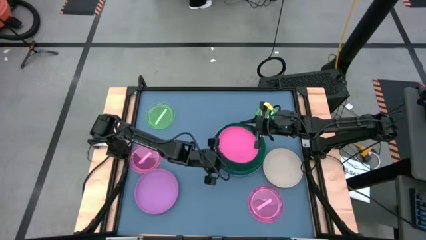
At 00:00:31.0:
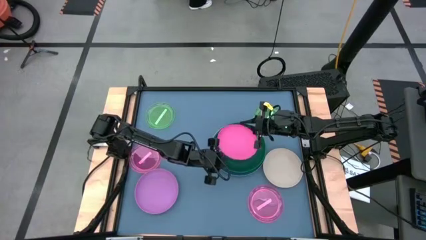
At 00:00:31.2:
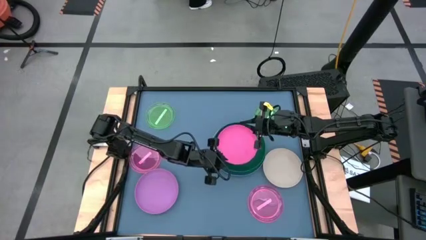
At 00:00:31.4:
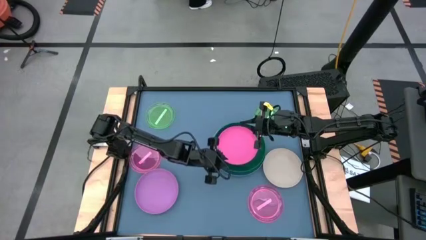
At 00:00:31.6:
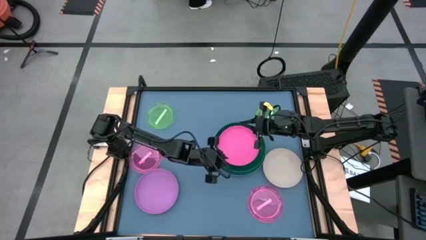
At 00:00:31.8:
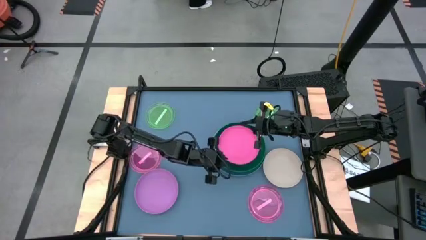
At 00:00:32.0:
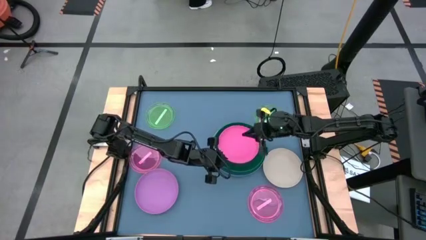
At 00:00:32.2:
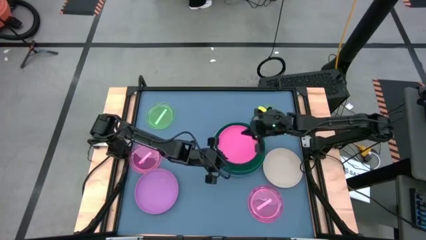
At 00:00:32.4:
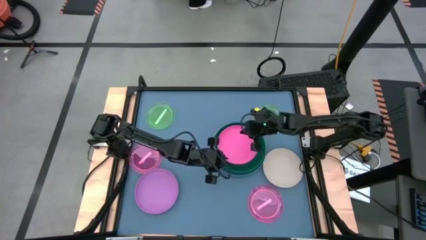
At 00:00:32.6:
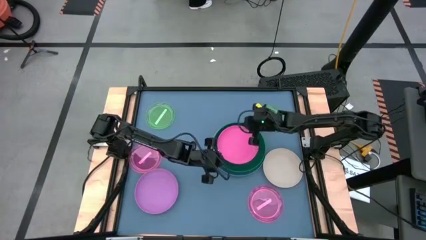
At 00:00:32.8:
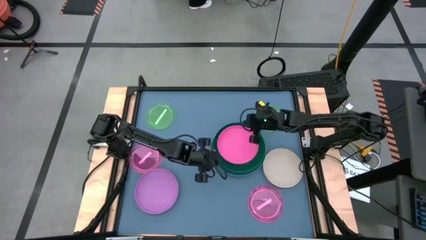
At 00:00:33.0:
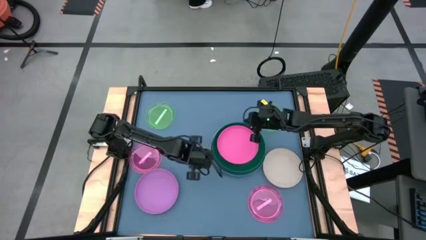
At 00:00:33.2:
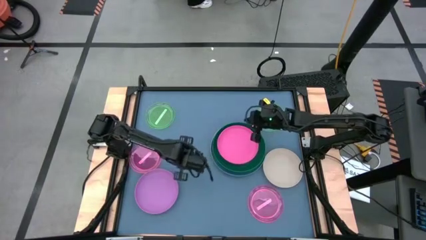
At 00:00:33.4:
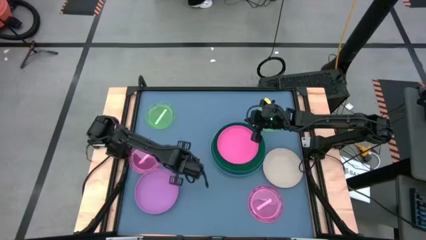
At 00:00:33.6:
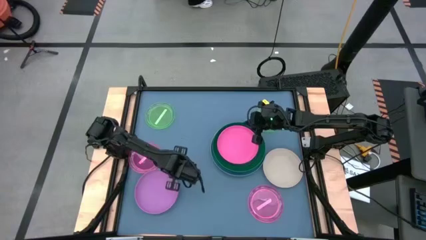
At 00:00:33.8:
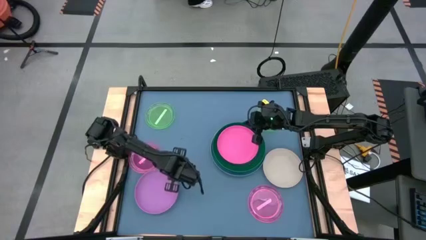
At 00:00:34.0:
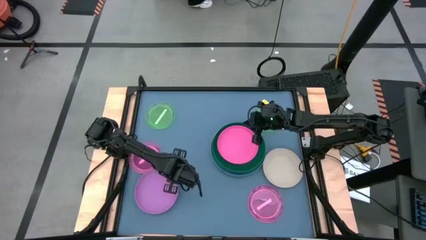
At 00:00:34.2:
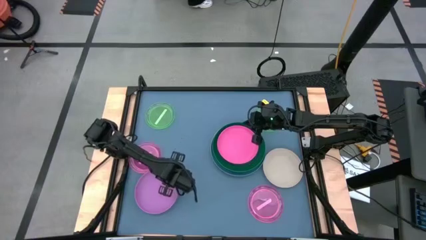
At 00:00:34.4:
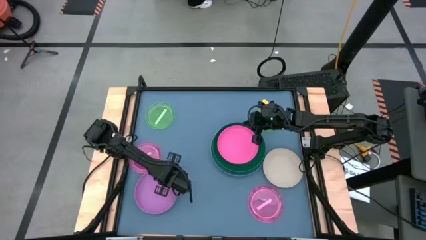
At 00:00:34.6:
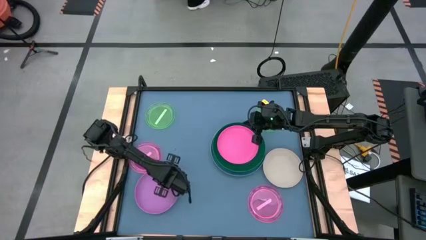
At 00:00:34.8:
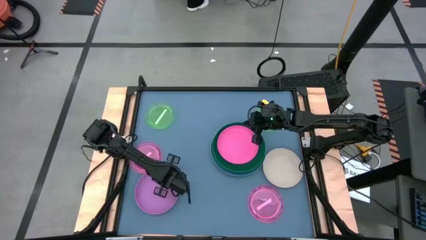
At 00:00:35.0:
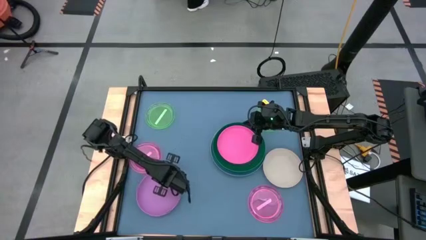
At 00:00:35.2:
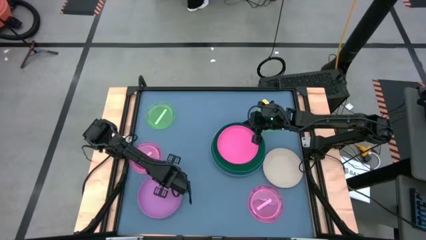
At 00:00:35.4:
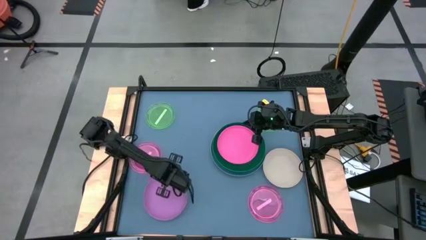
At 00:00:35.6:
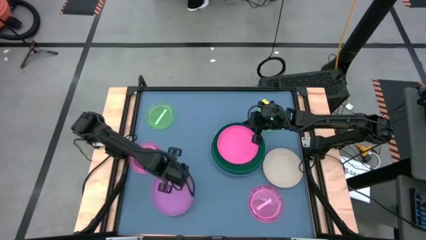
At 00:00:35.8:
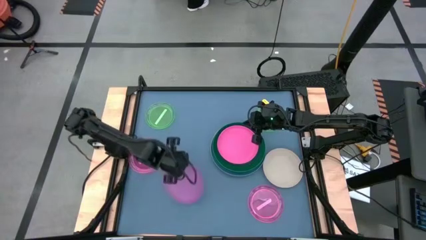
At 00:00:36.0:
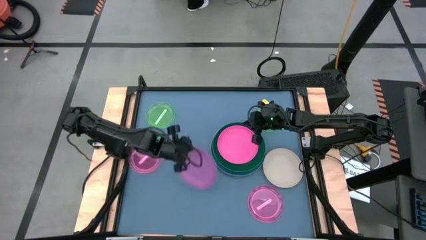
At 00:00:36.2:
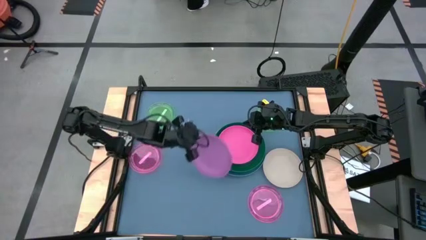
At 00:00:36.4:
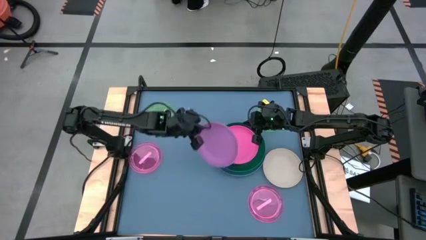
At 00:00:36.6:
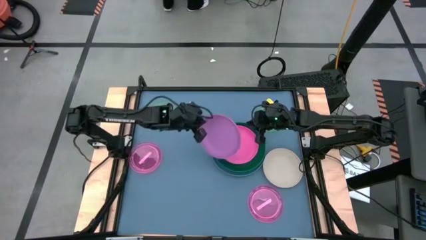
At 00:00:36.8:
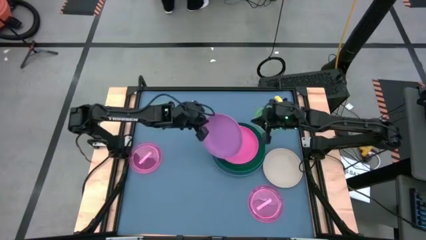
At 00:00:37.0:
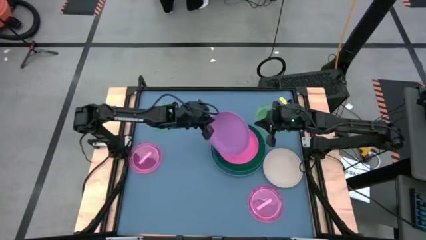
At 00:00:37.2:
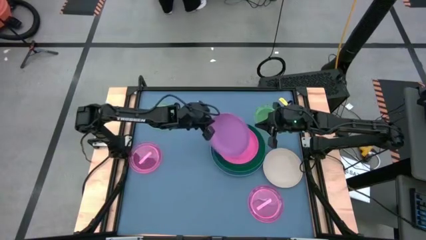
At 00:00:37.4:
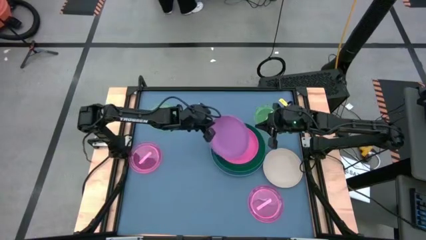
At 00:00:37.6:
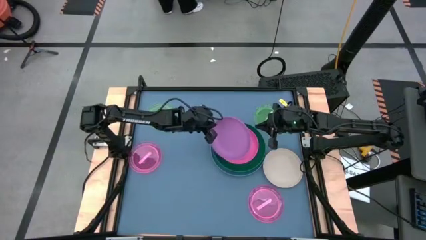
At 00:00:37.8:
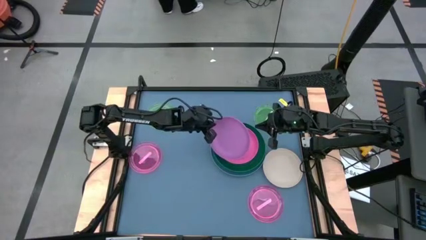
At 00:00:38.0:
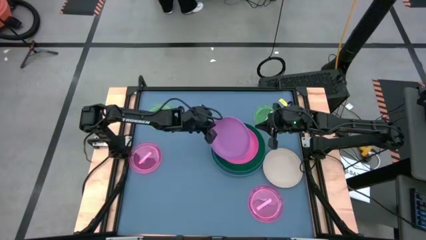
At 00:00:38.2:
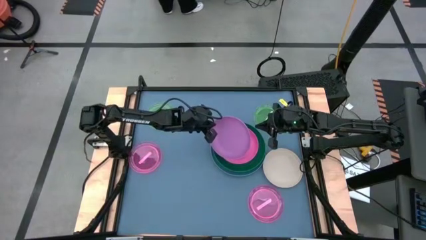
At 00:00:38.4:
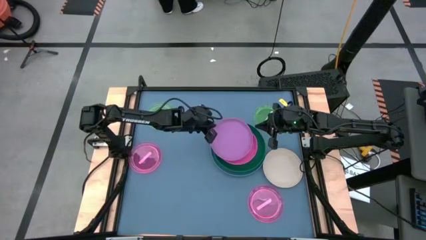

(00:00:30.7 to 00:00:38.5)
Task: Stack plastic plates
Stack the violet plate on top of the pink plate

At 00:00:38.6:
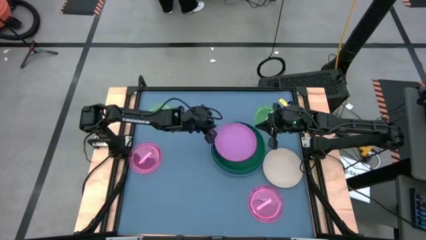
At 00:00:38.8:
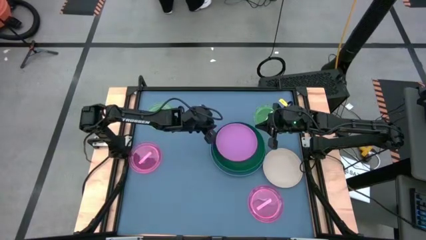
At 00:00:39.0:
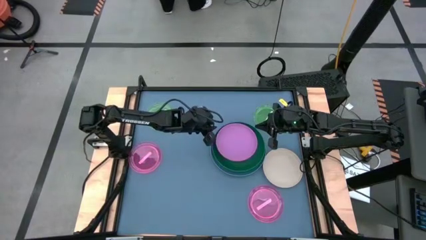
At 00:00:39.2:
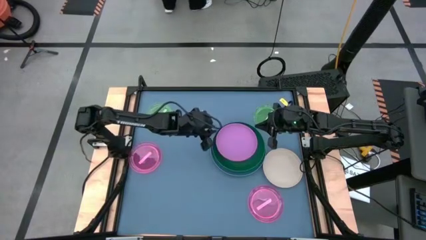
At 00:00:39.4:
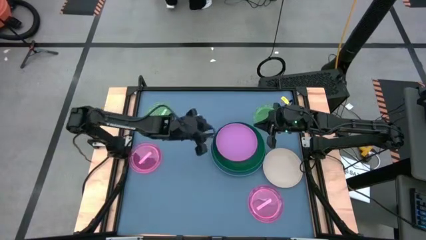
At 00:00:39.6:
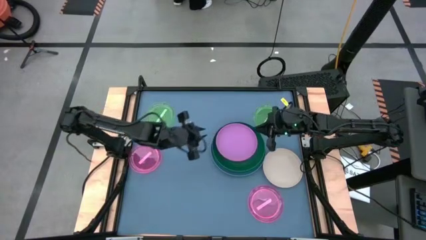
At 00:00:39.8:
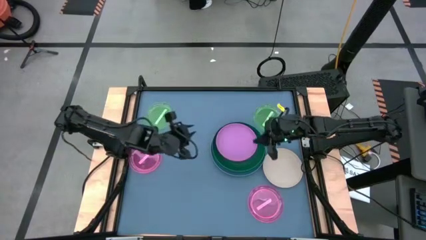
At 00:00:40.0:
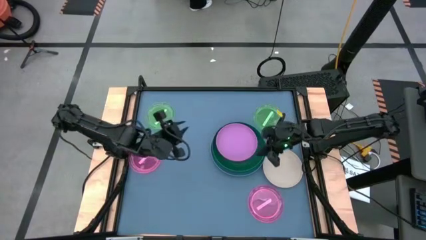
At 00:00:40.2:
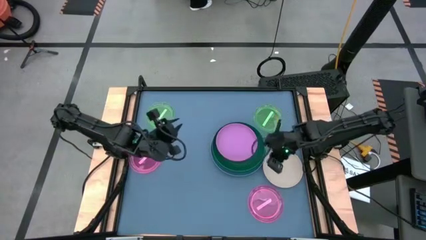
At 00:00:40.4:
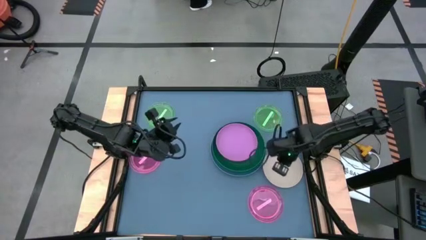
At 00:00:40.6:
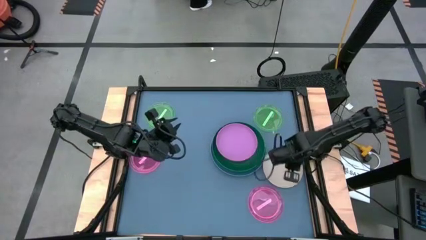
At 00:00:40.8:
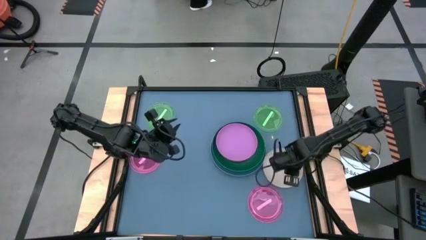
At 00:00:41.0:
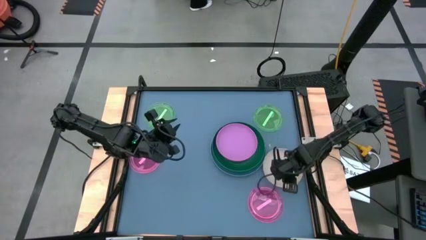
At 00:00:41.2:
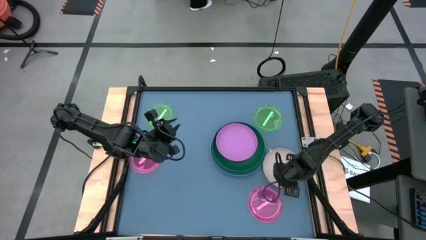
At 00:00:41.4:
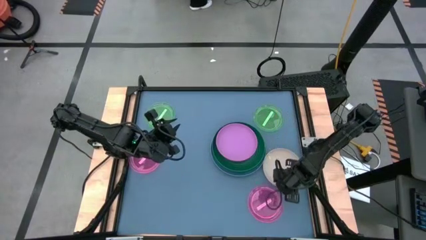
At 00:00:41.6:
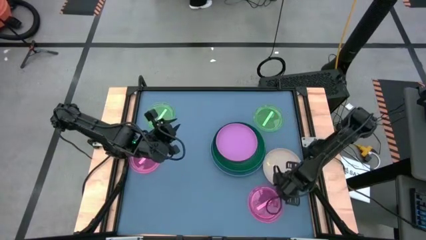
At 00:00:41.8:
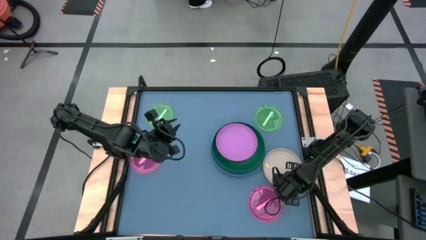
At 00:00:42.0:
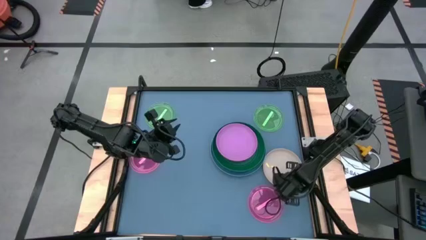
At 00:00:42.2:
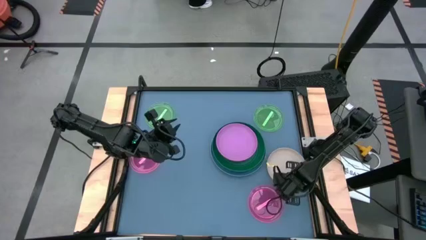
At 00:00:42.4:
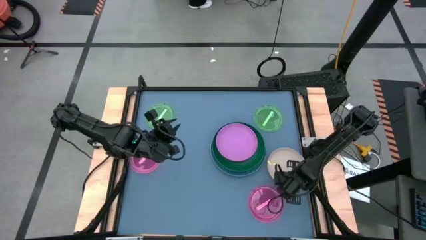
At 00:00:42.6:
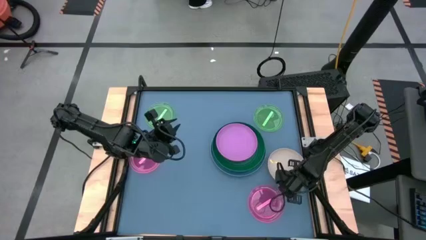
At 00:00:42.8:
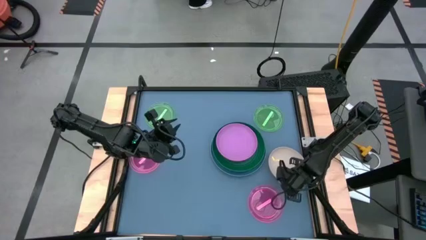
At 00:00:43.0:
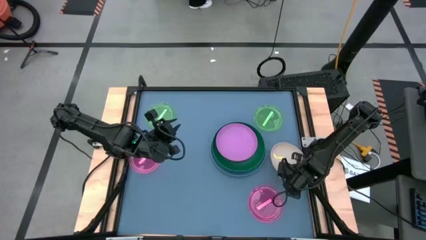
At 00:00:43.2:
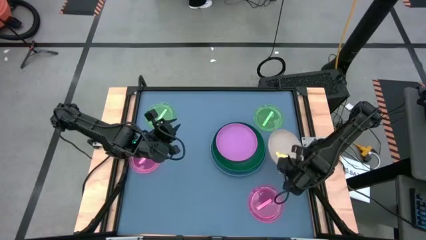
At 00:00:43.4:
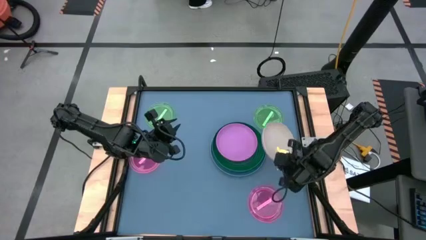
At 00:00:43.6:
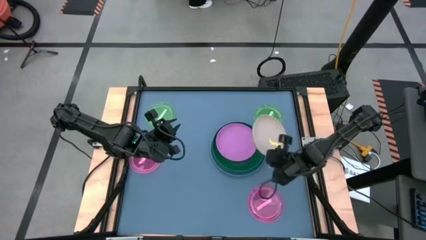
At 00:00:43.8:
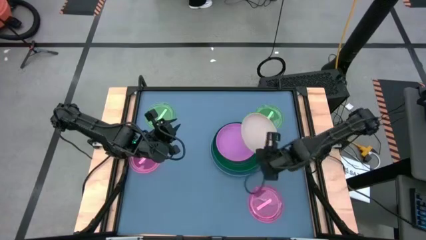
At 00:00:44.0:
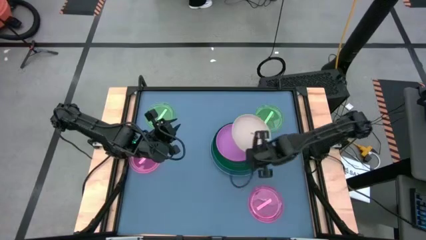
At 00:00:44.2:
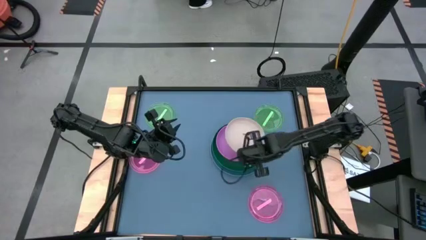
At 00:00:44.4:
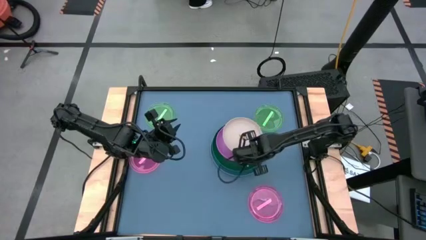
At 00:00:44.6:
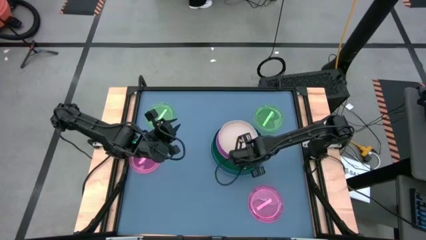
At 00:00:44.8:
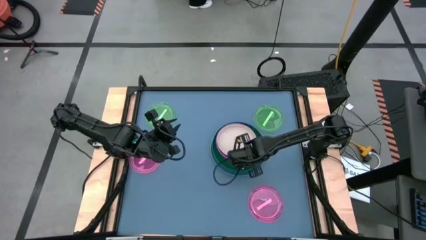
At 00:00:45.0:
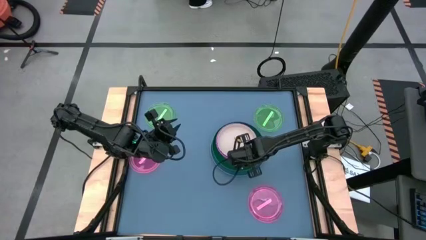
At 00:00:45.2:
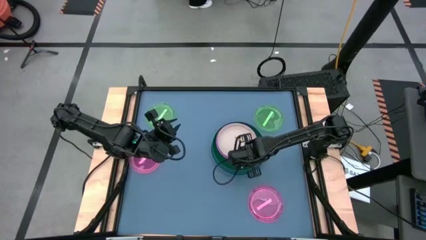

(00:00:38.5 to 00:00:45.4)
Stack the white plate on top of the violet plate
